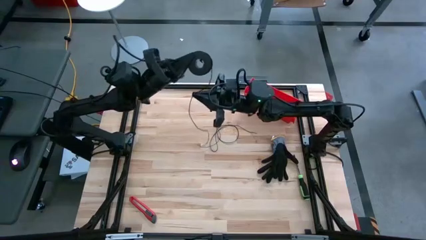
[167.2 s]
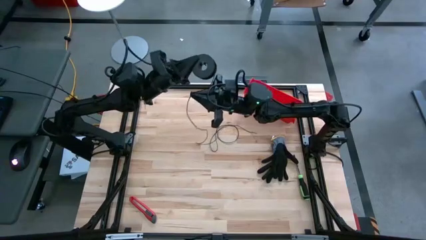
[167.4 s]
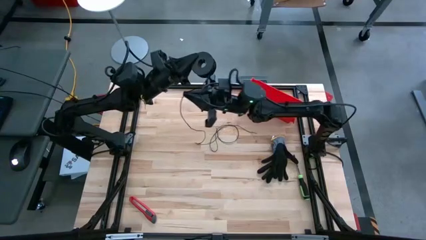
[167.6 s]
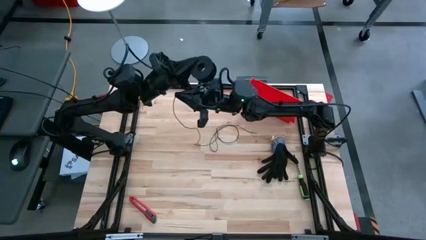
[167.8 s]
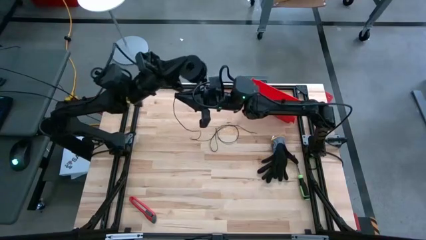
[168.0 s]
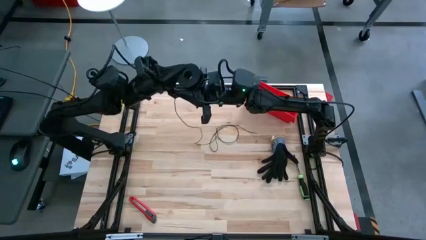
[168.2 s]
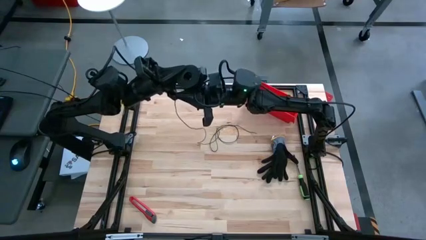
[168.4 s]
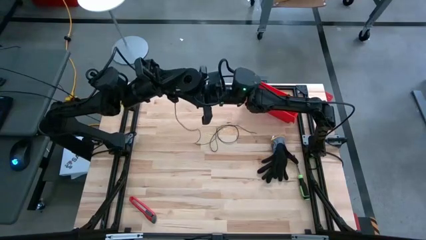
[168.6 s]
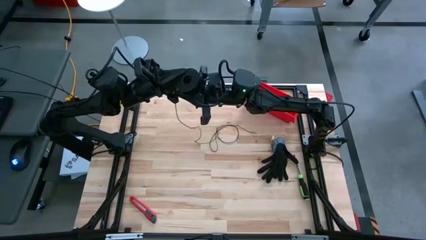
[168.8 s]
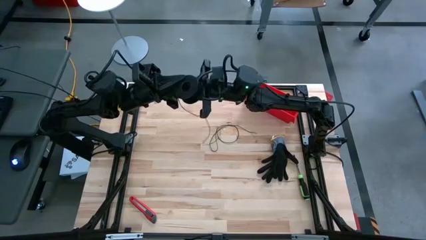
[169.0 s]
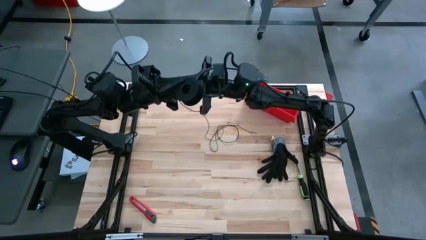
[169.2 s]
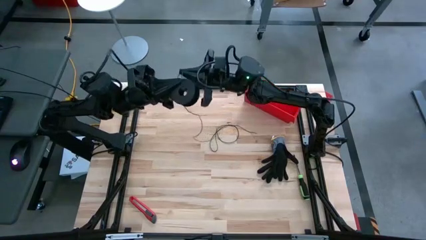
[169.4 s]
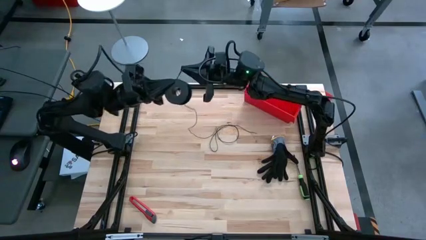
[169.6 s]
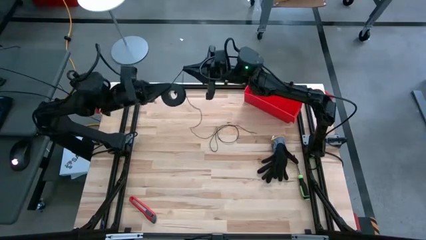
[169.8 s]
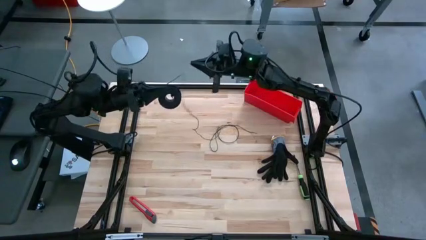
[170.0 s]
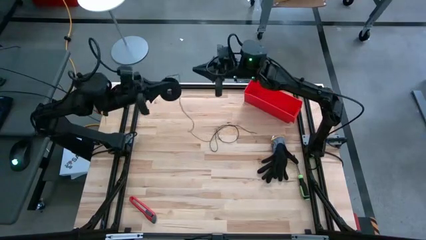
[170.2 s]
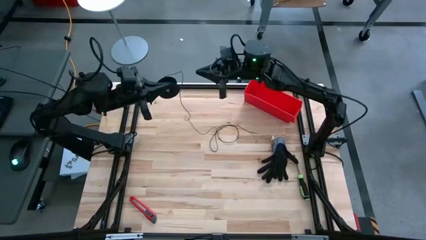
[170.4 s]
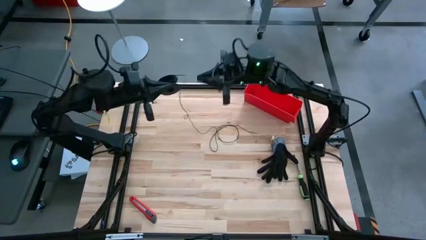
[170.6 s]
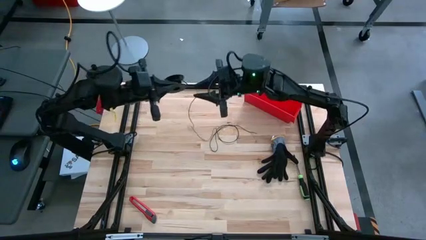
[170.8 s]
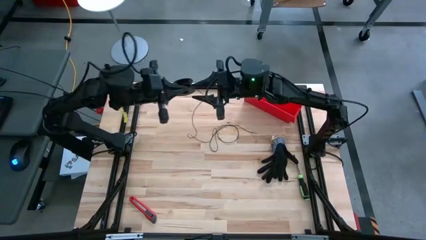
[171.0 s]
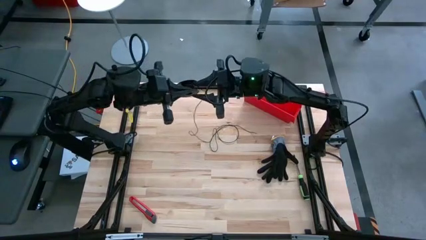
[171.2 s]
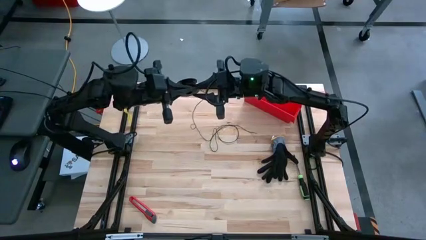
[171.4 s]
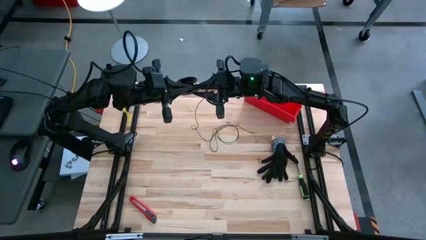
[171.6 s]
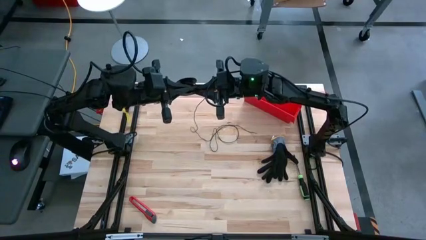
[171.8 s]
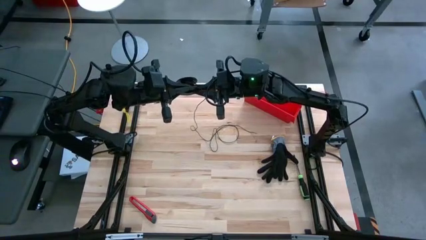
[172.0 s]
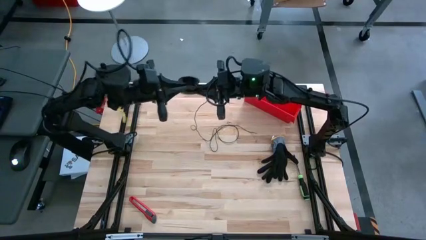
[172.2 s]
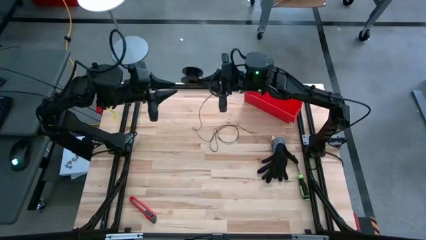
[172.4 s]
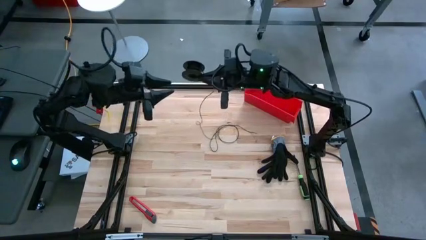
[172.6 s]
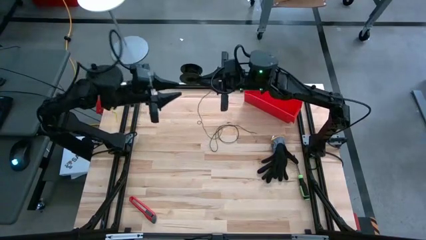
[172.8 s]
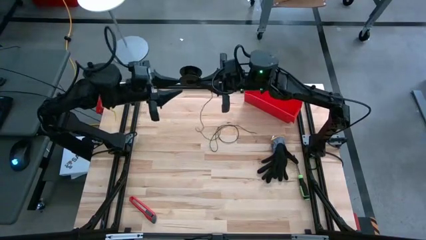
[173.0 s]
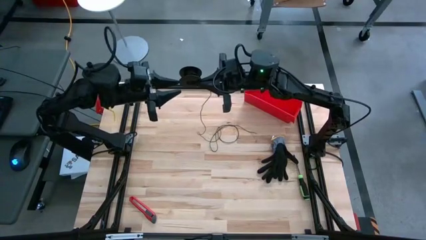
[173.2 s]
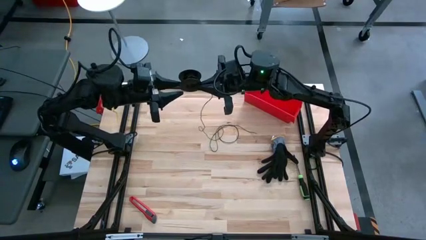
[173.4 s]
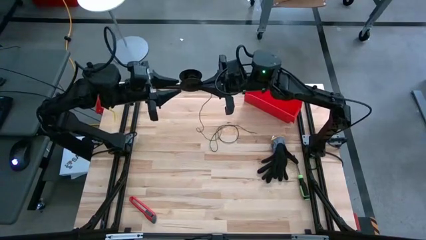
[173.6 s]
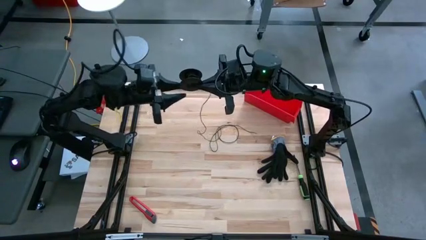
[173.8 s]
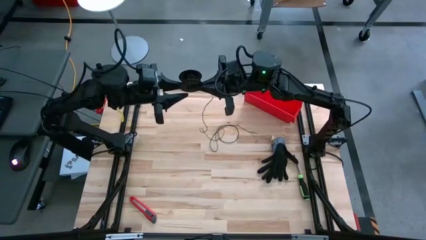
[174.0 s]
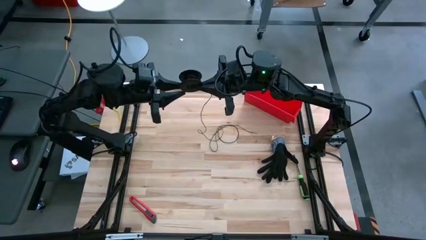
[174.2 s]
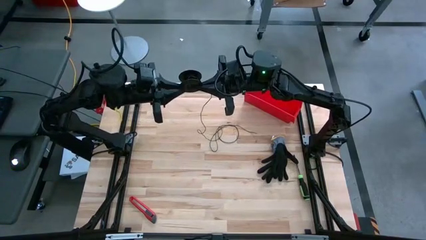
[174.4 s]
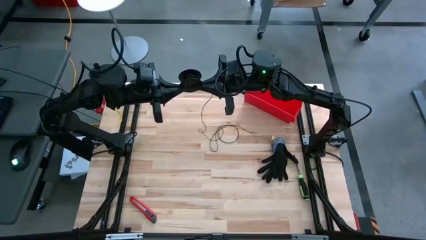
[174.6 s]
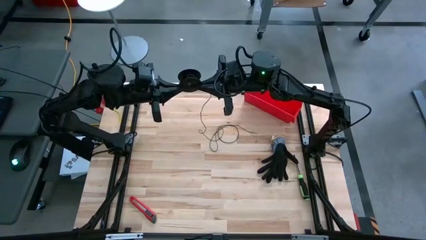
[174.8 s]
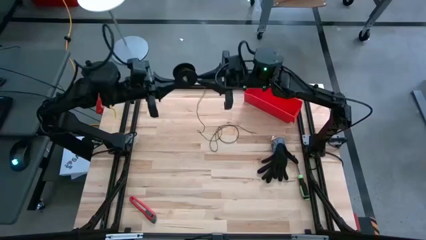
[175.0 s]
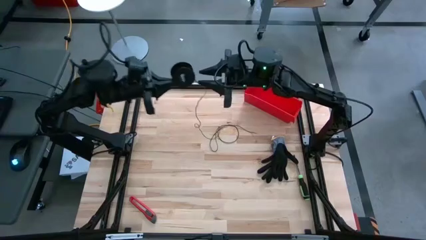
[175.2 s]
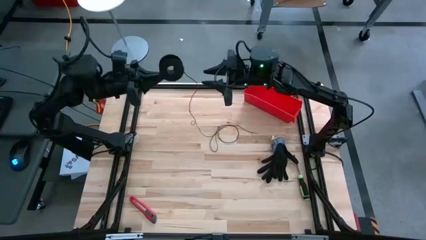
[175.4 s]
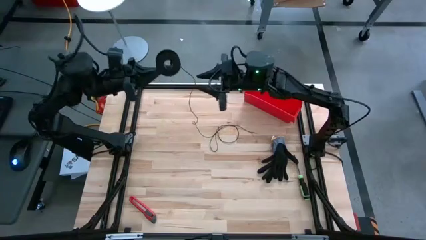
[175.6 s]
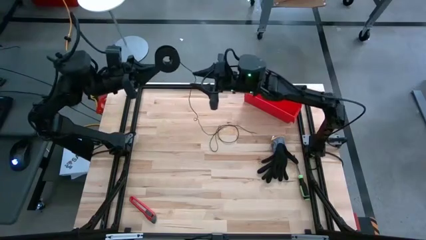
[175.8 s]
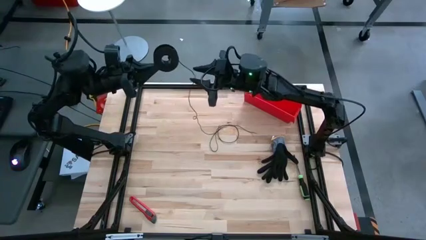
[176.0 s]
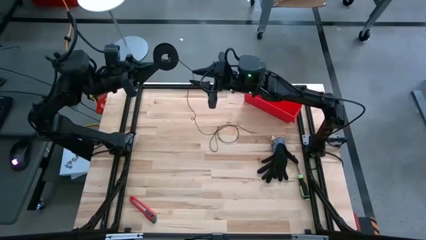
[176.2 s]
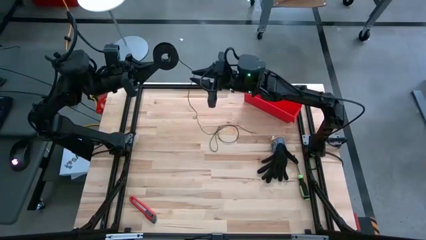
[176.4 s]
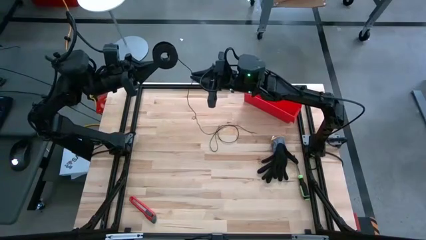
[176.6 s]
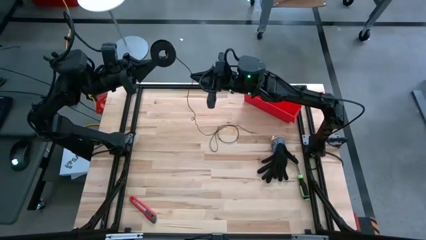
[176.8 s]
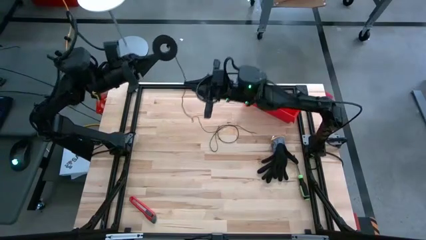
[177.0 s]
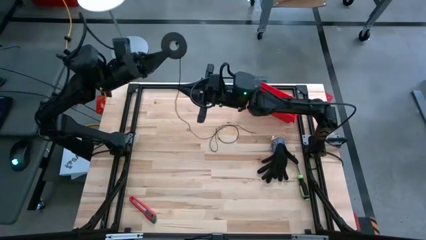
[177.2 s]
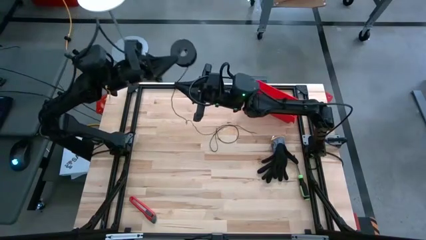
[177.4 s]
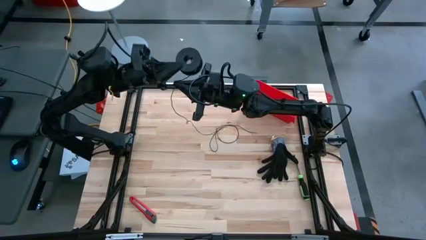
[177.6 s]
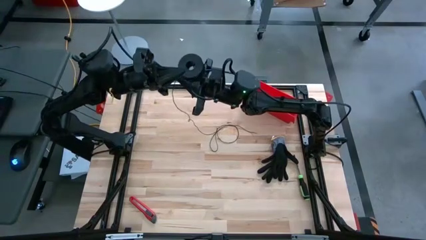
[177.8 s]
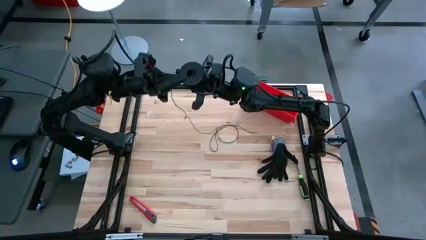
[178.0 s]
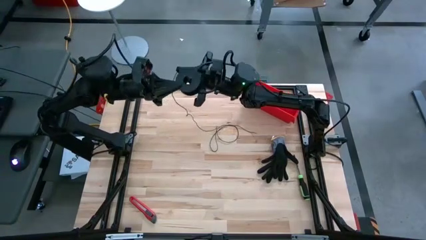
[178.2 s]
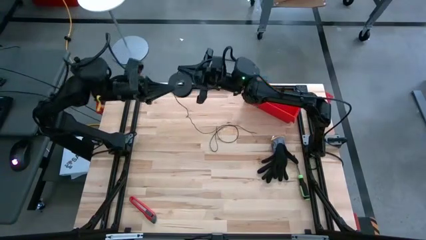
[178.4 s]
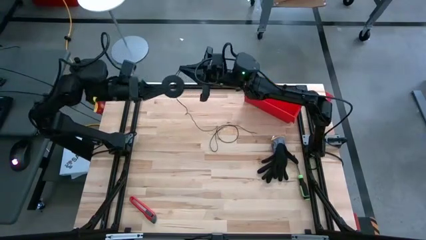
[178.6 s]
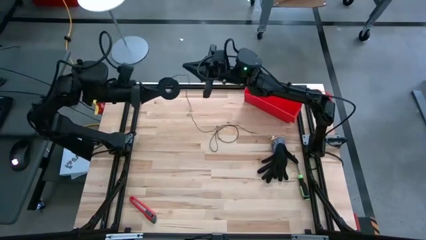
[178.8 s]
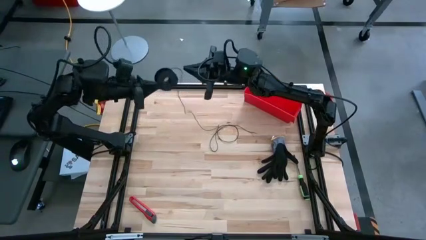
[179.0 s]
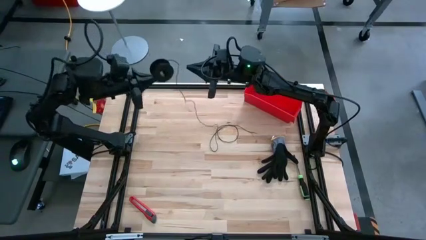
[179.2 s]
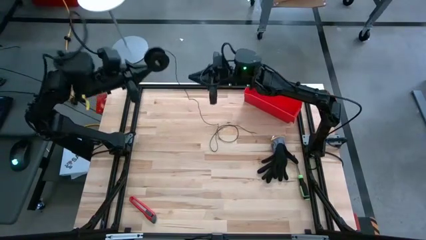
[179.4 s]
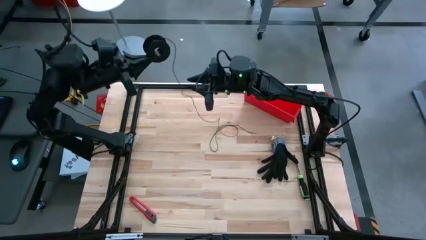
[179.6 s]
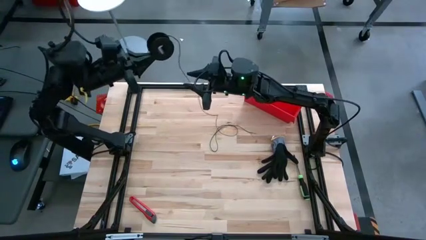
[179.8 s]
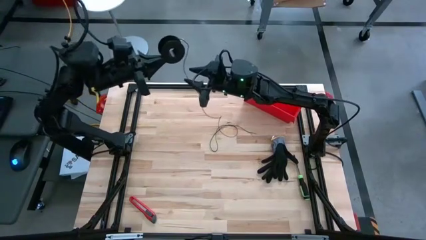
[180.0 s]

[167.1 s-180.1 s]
Task: Coil cords
Coil the black wire on the spool

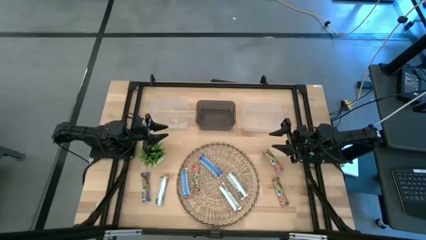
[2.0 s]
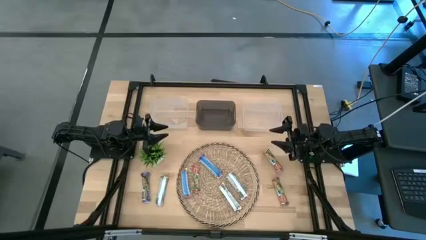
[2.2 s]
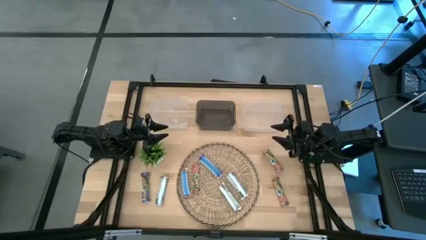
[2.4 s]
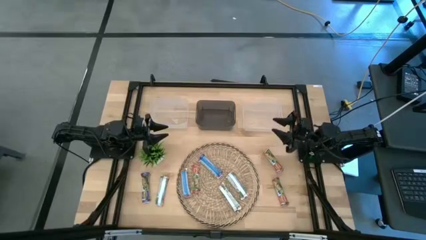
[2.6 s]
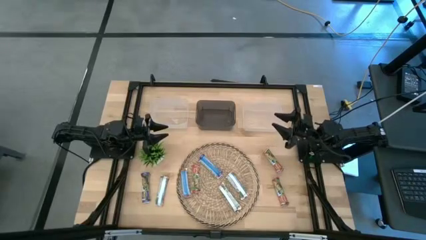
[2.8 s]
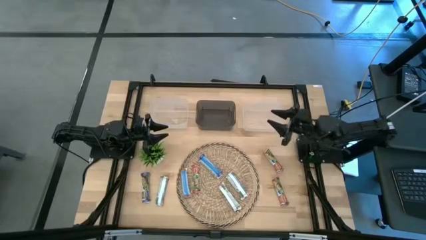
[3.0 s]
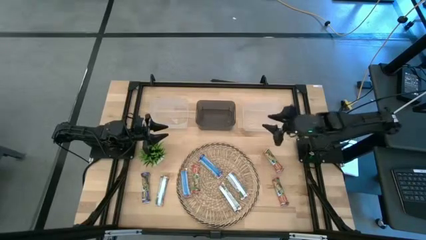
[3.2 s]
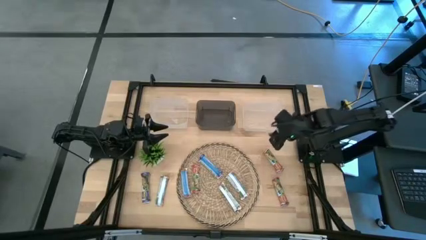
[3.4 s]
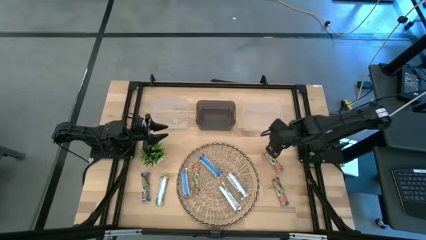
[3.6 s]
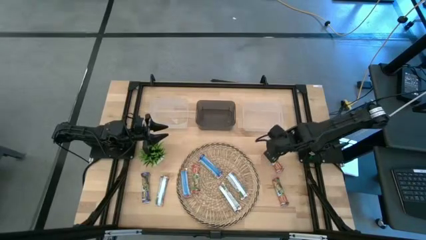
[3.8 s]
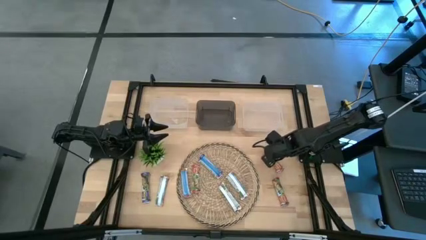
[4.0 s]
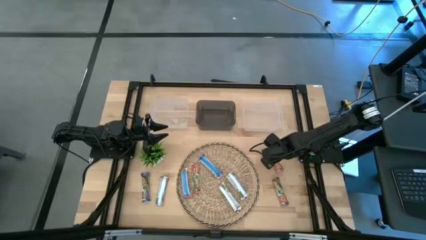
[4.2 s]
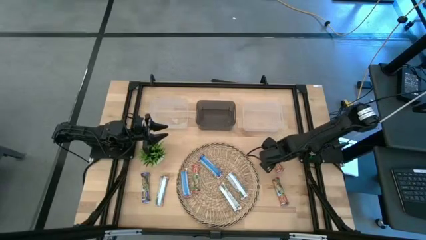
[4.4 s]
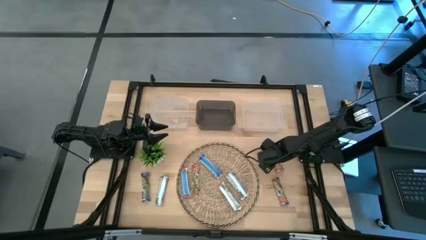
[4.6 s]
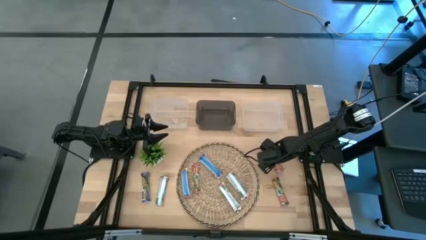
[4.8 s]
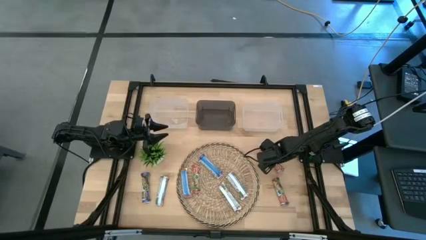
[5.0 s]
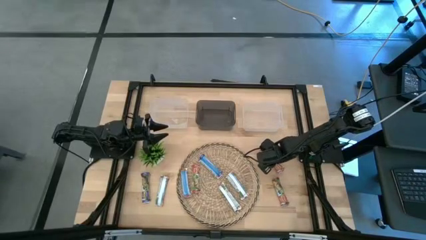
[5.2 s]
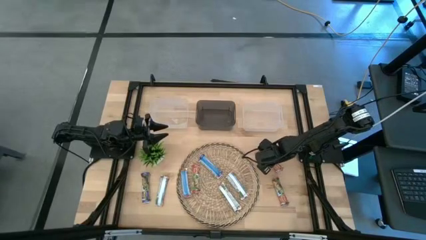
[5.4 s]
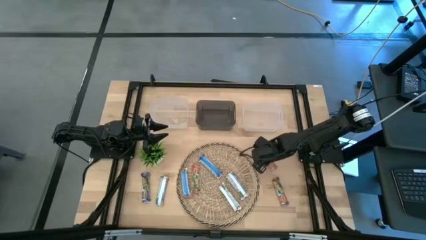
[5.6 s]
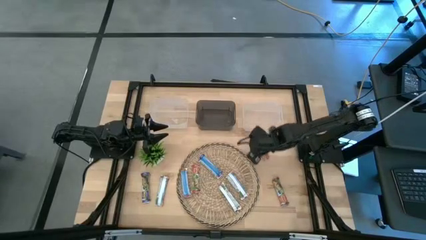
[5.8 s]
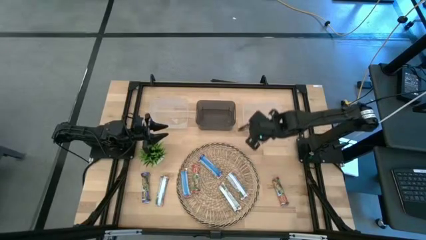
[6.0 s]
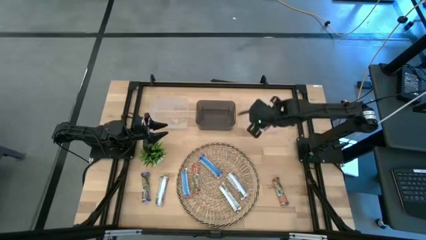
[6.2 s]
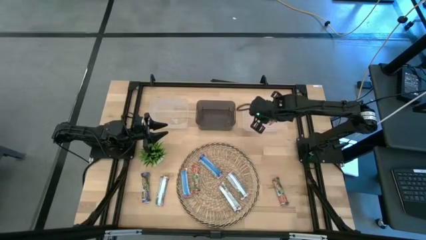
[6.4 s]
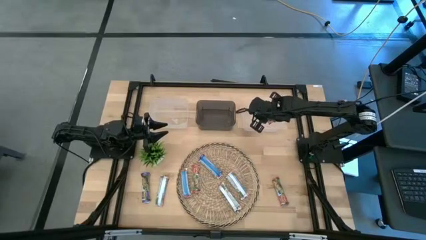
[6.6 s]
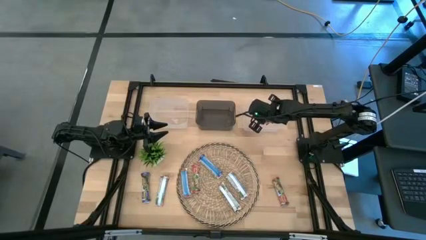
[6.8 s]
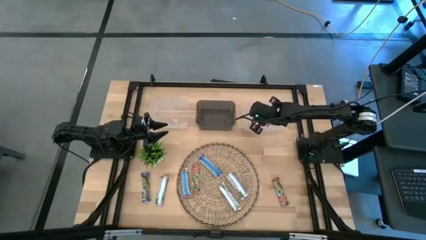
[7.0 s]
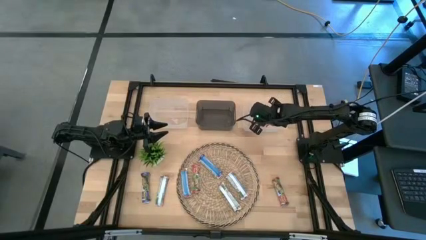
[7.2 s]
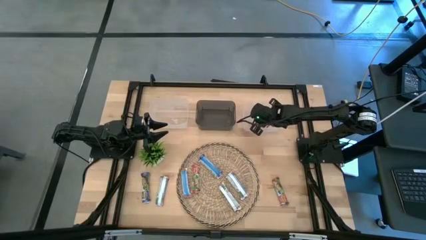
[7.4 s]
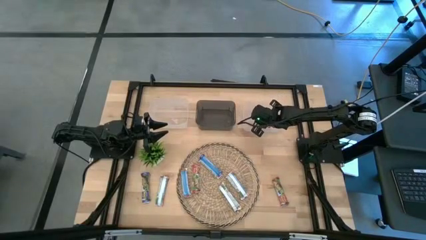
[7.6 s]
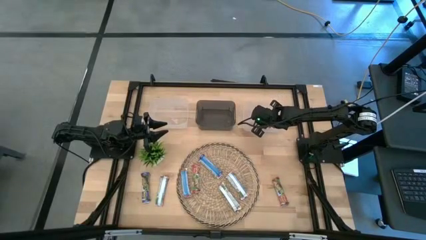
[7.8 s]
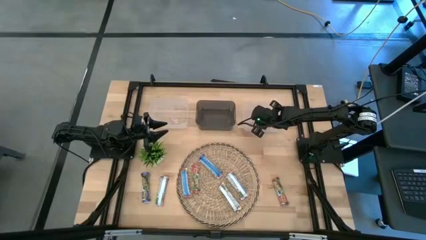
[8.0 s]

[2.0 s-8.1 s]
Task: Pick and place Granola Bars by type
Put the red granola bar into the right transparent bin
